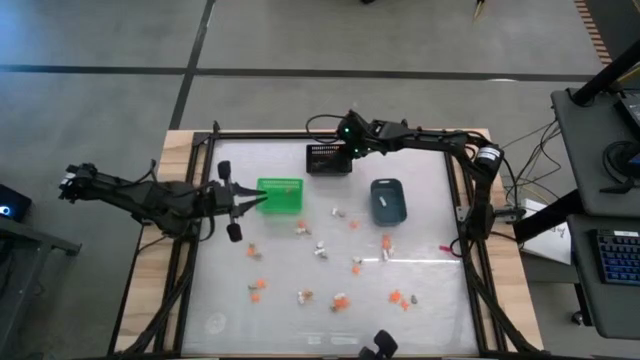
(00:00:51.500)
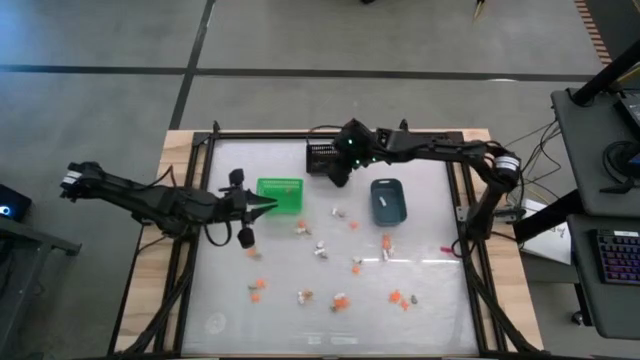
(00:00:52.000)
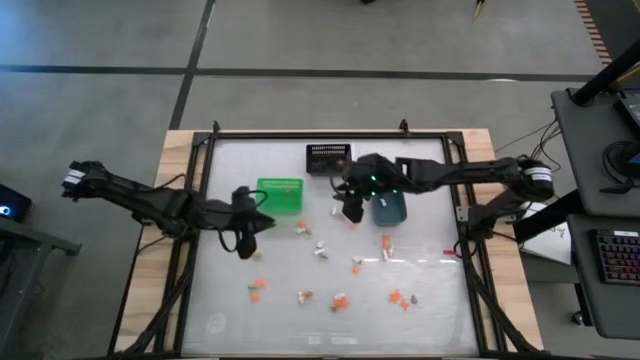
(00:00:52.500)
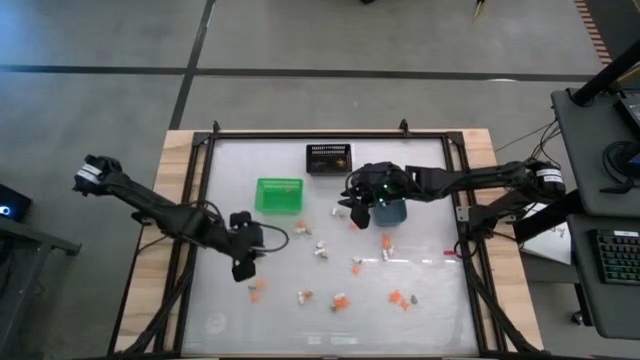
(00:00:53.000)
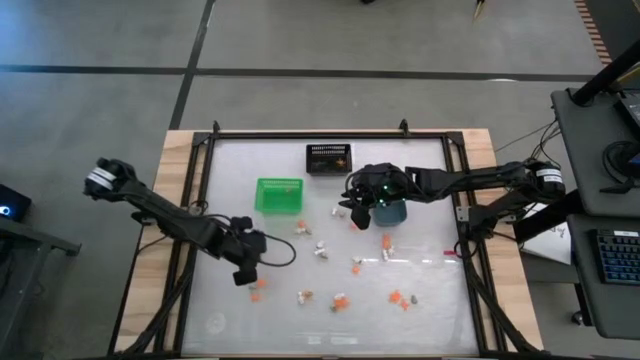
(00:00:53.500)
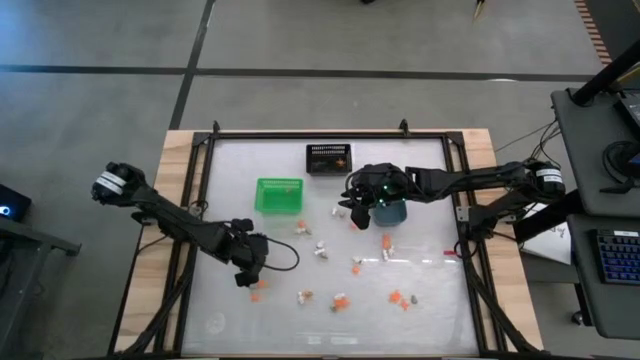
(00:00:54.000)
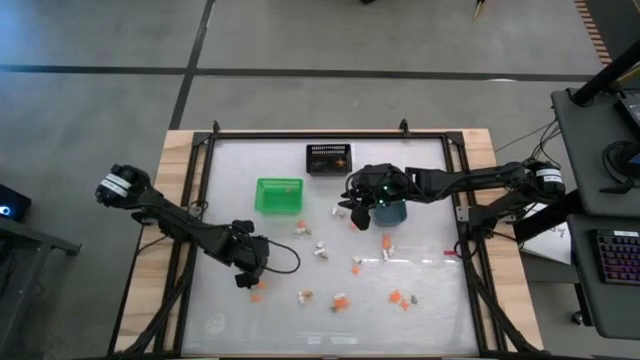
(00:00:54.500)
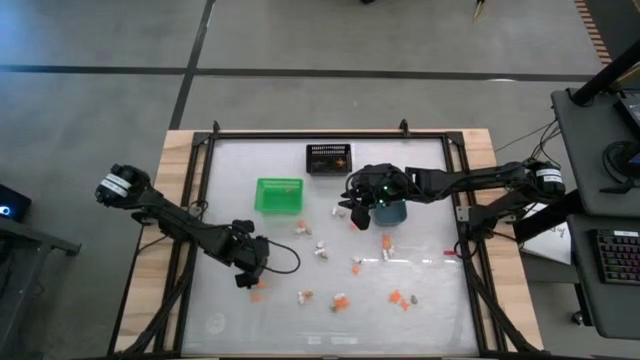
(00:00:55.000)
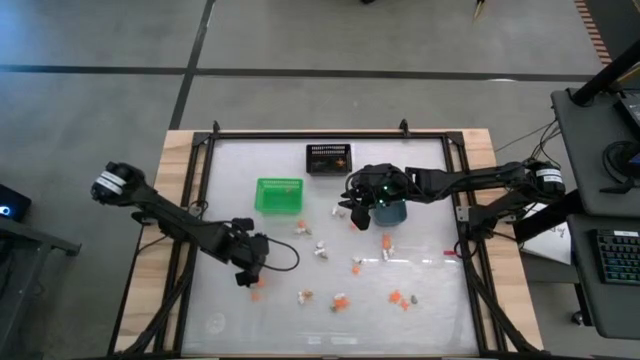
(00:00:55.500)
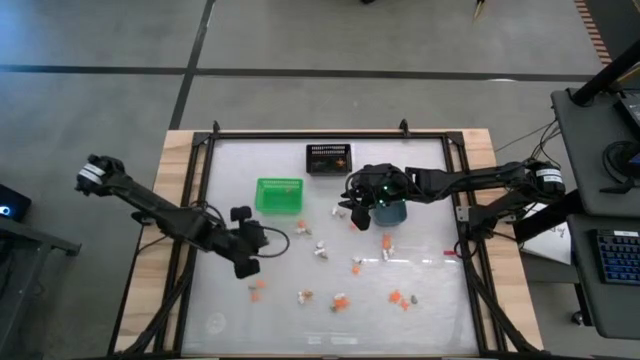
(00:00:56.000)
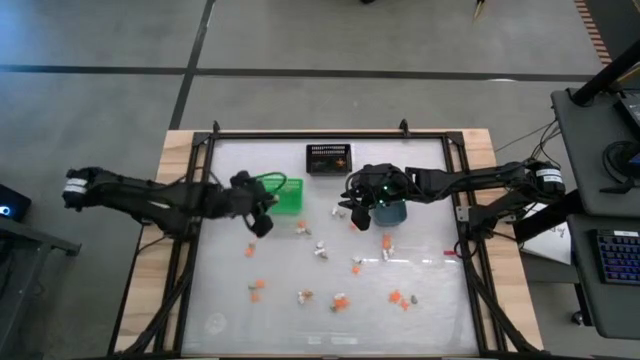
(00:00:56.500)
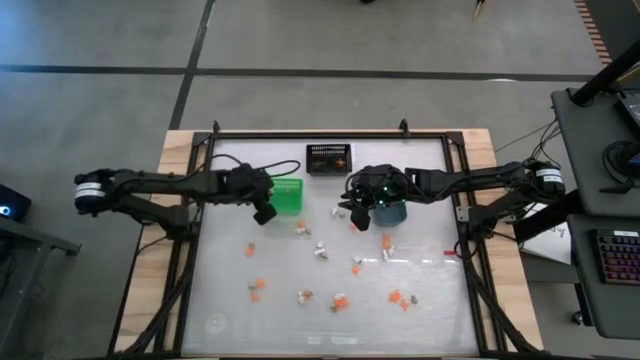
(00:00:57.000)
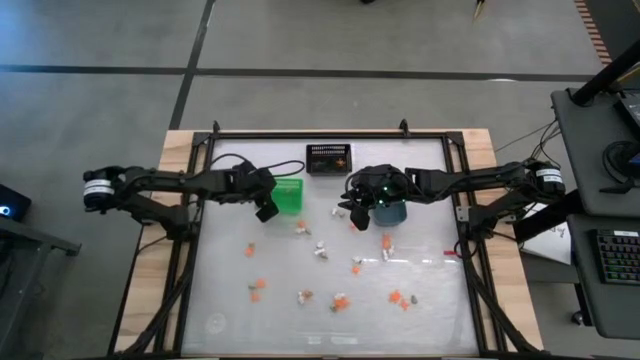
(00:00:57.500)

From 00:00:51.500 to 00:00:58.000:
Task: Sort Halloween decoration
Put the gray skull toy into the green bin

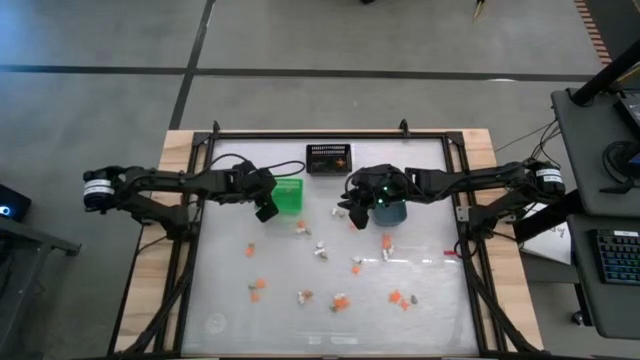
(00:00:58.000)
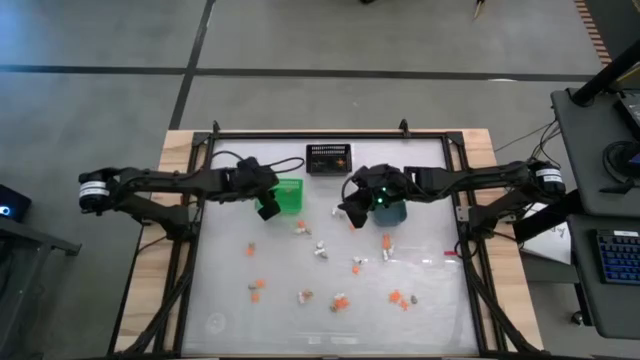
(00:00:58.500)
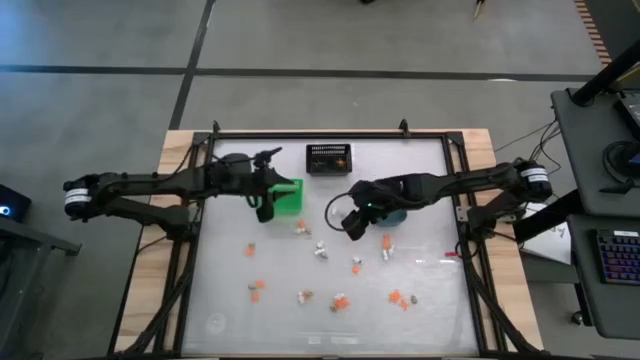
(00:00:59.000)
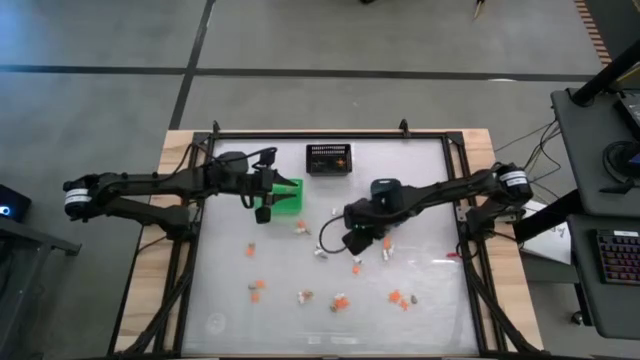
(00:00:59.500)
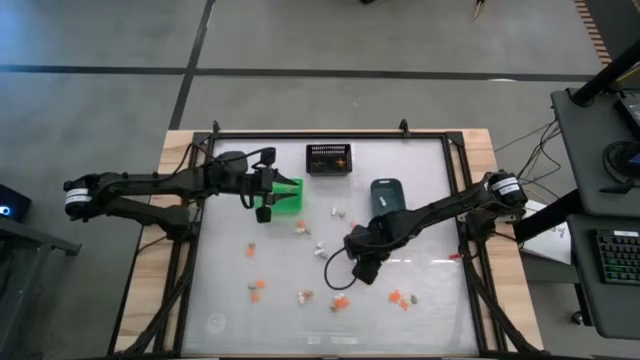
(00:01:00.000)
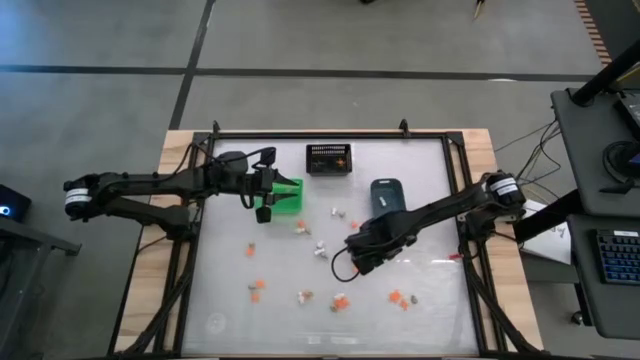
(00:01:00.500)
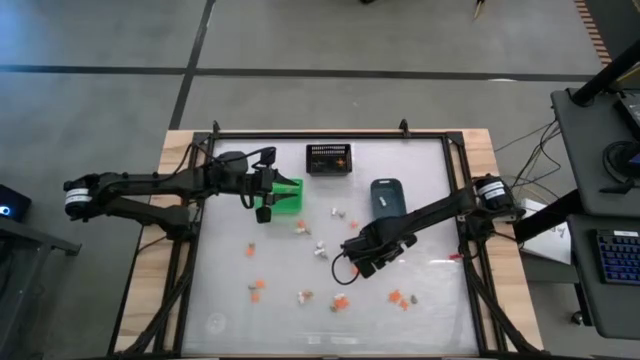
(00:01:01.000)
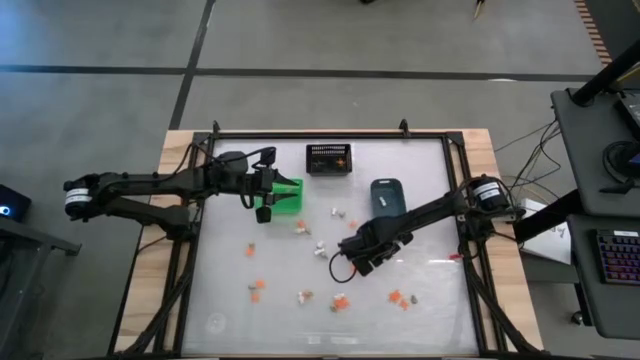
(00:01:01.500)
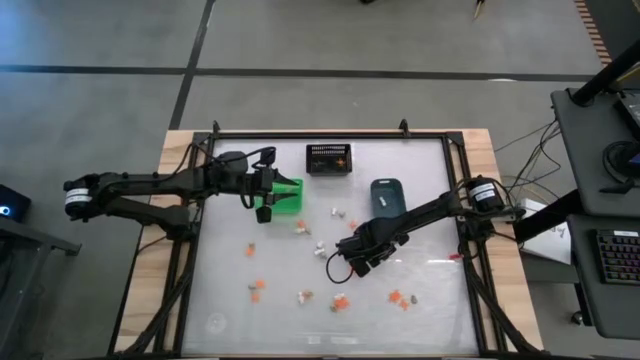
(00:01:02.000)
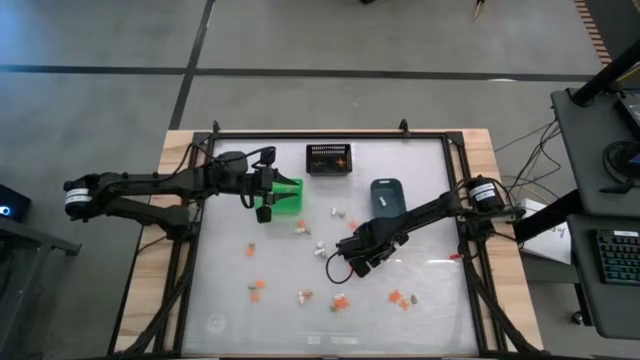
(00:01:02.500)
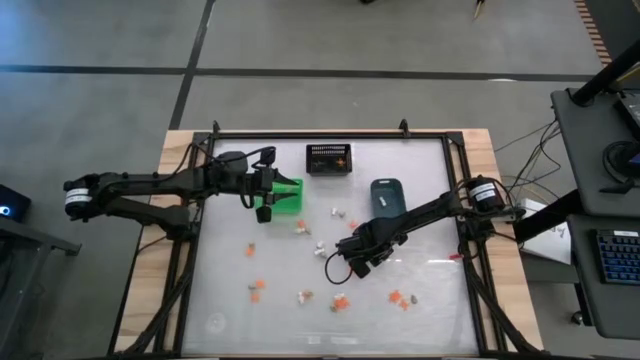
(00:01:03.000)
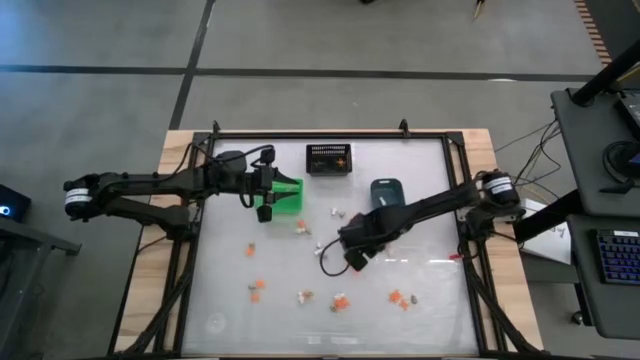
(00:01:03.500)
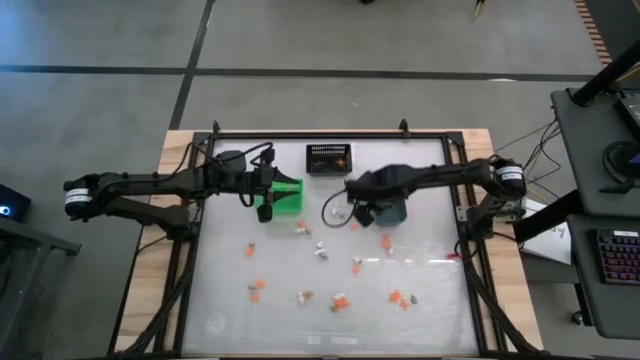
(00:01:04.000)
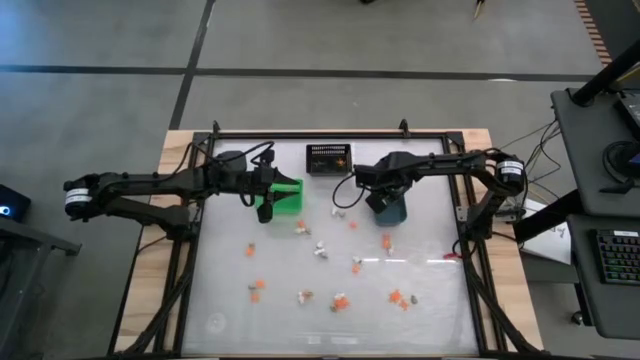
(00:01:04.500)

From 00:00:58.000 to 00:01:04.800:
Put the gray skull toy into the green bin

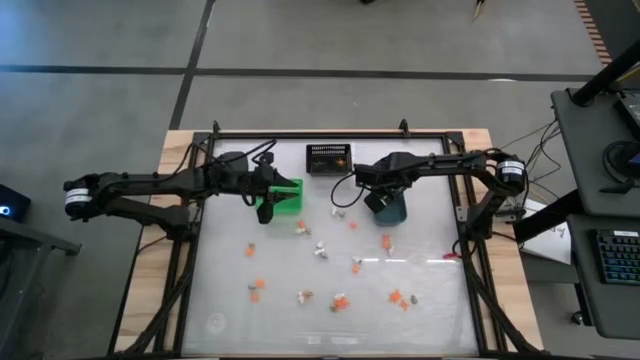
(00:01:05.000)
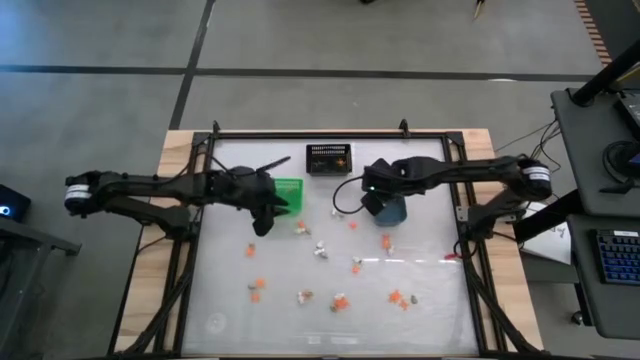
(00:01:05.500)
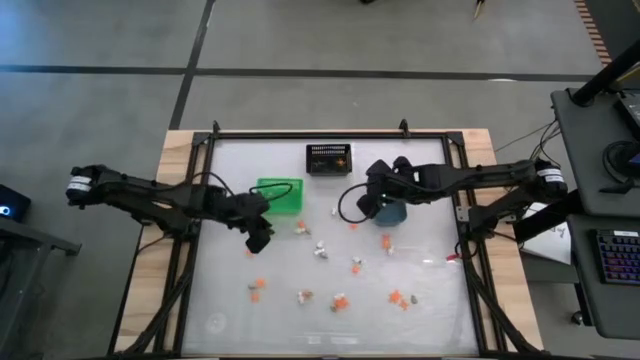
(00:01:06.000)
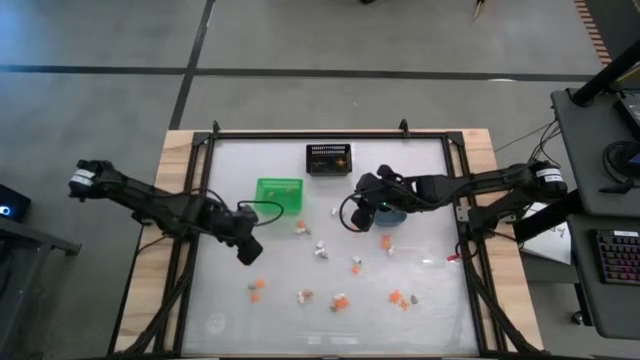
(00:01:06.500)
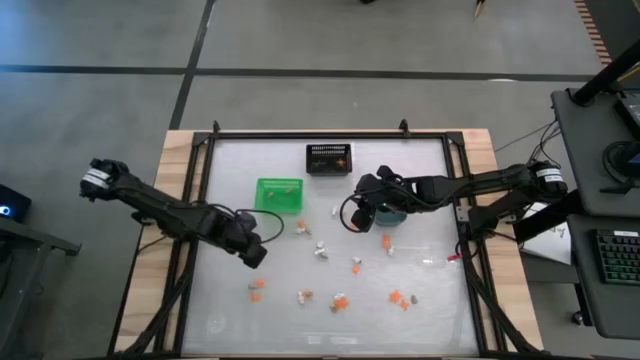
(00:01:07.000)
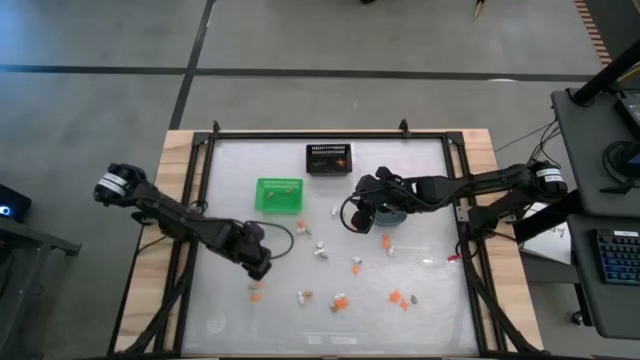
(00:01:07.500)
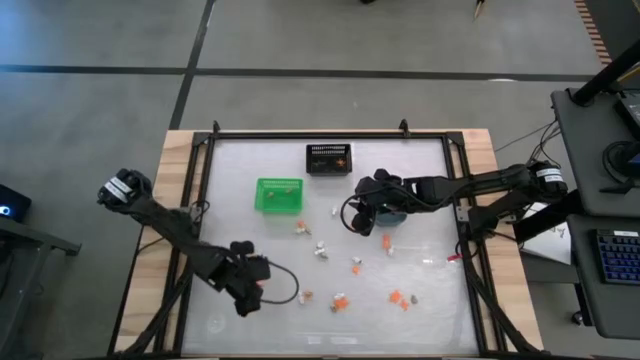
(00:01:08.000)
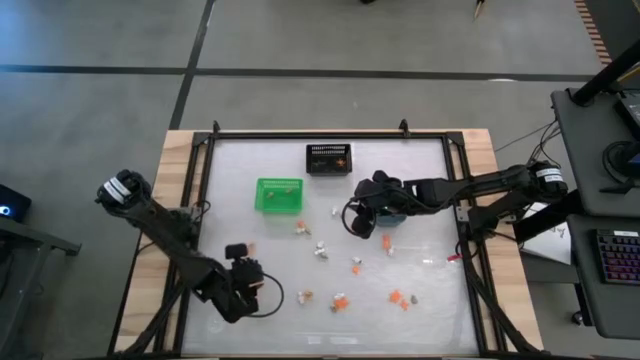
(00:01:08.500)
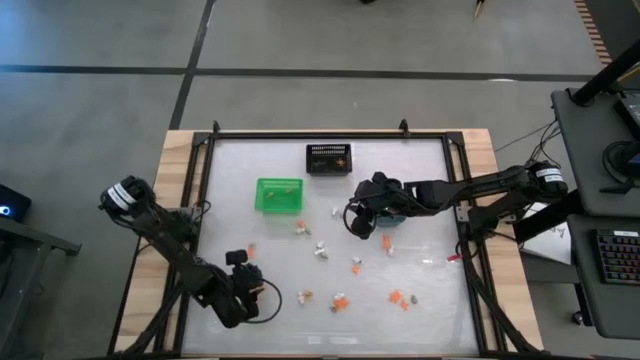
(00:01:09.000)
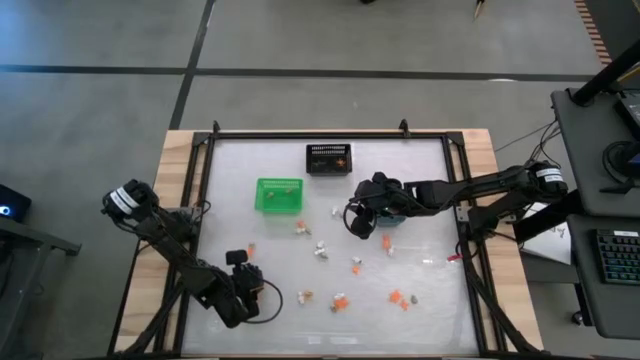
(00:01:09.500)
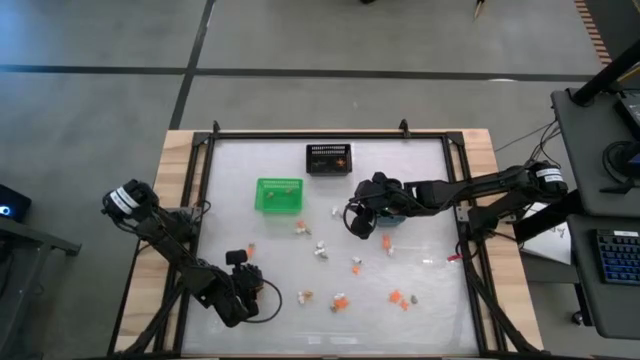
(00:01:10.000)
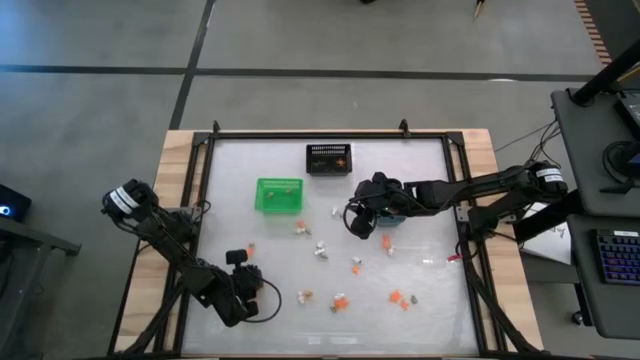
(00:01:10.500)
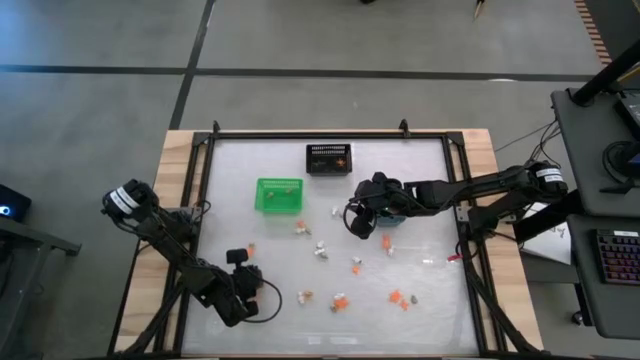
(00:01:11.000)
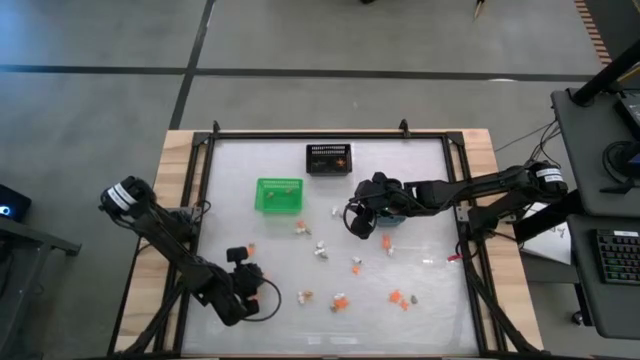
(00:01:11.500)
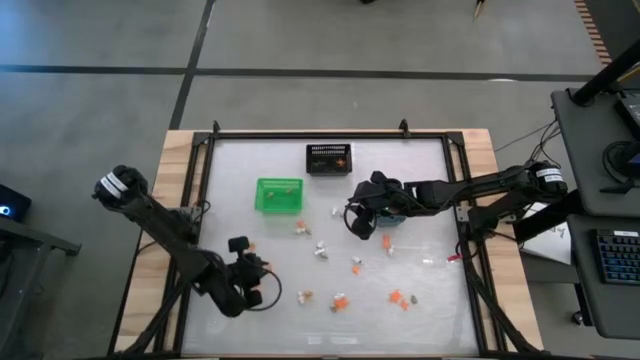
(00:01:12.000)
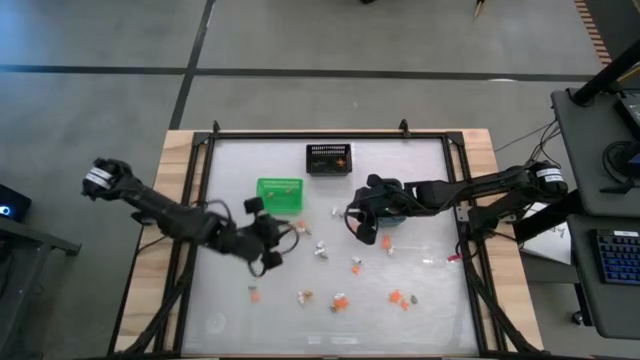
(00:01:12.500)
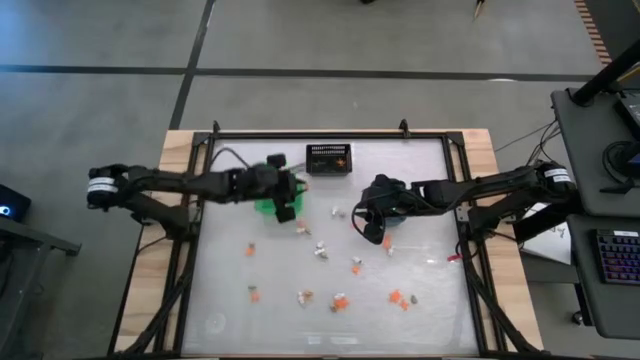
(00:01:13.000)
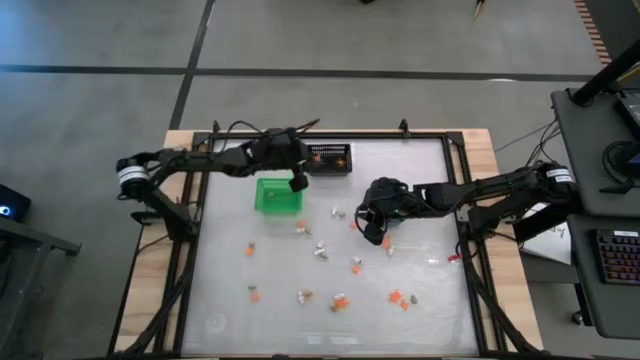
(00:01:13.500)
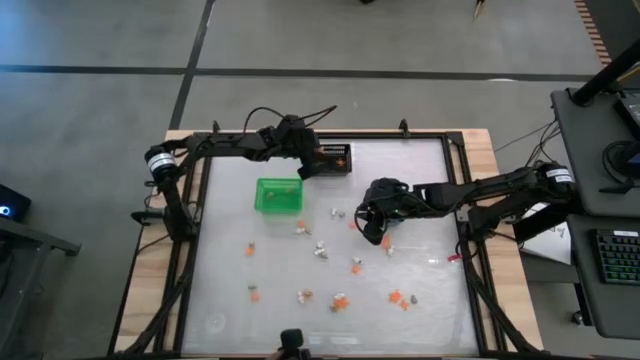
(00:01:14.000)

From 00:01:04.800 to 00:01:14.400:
Put the orange spider toy into the black bin
